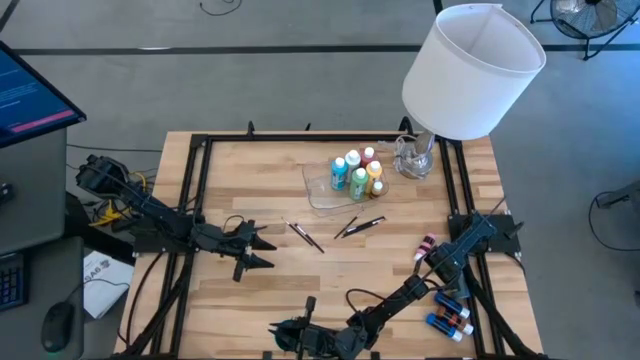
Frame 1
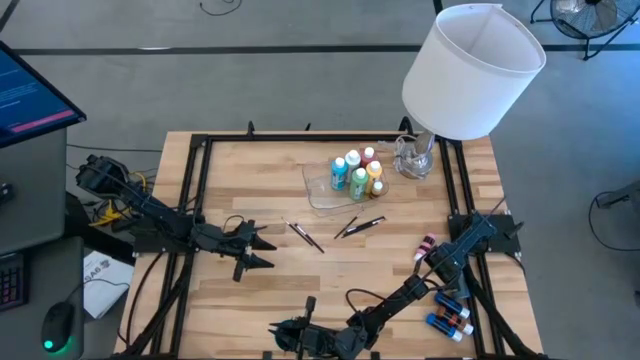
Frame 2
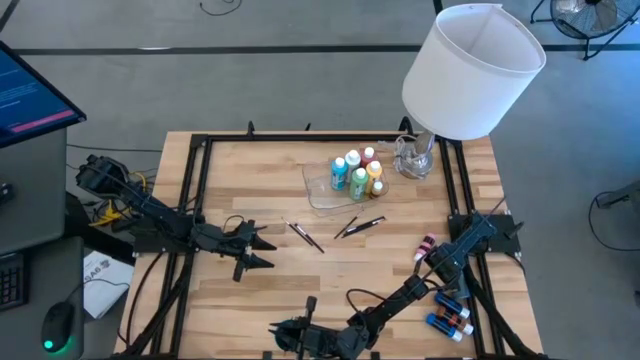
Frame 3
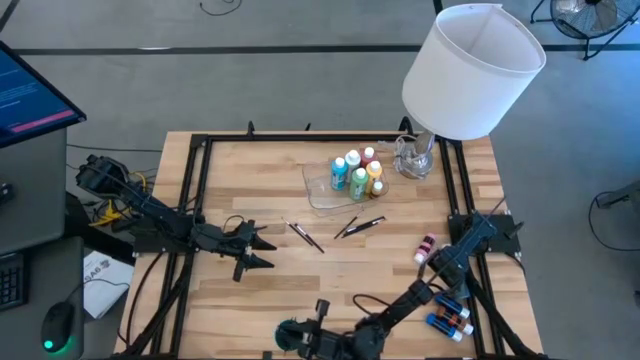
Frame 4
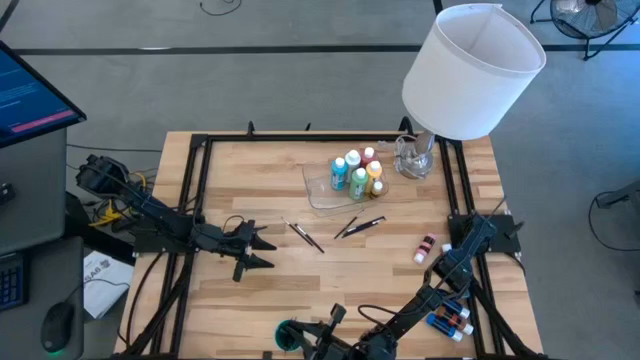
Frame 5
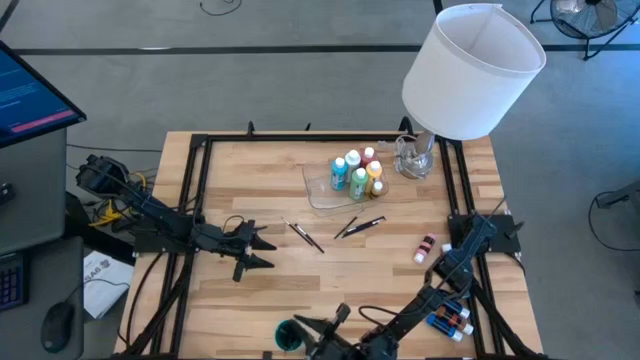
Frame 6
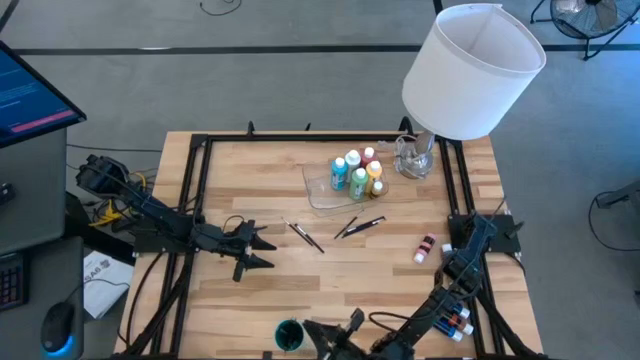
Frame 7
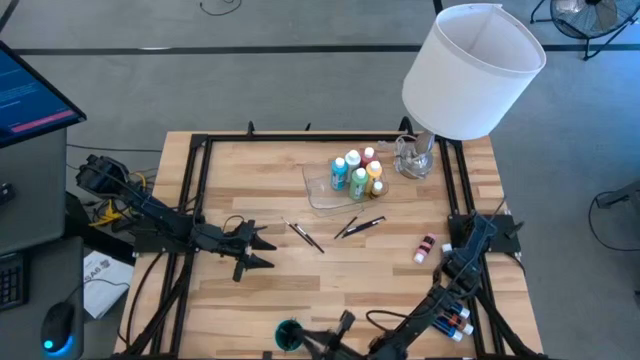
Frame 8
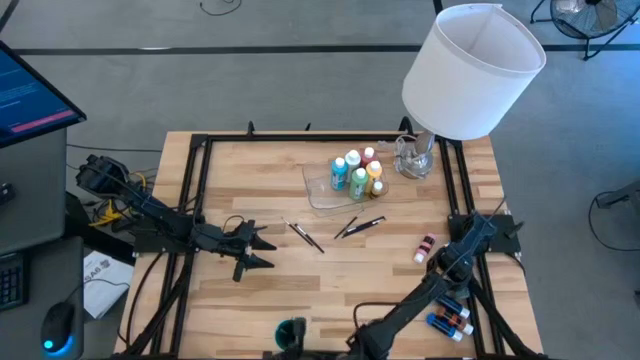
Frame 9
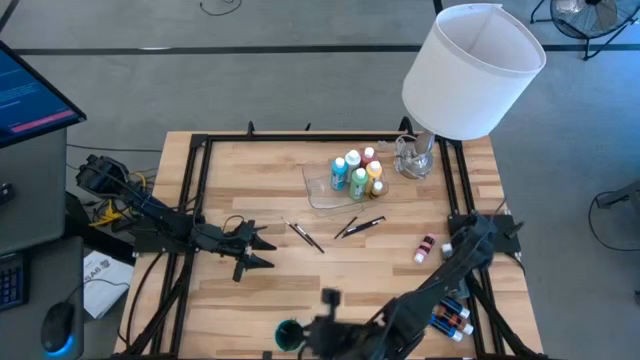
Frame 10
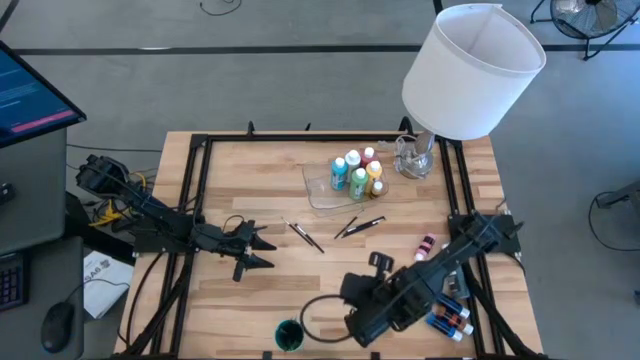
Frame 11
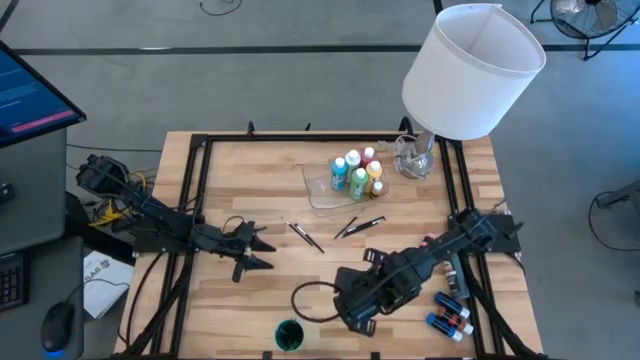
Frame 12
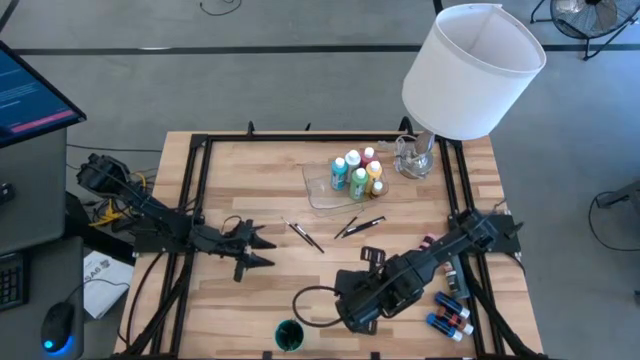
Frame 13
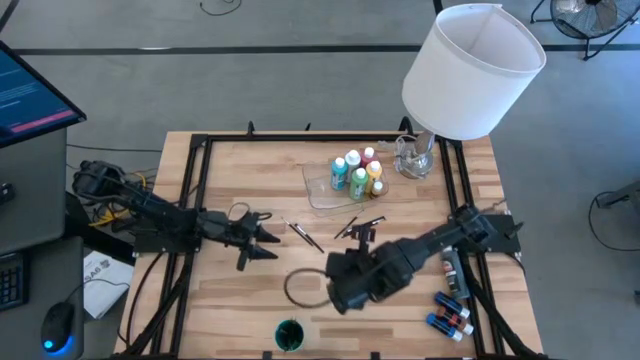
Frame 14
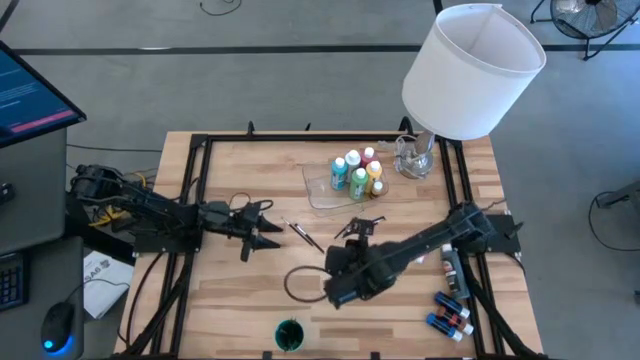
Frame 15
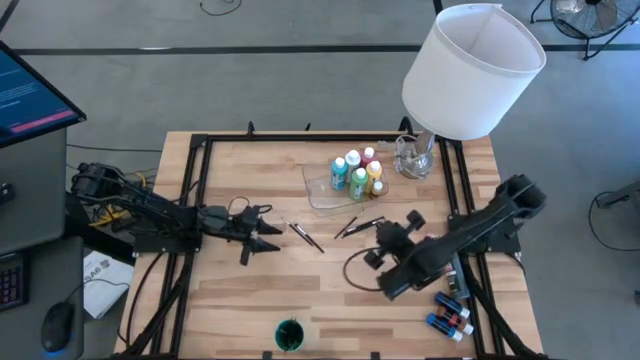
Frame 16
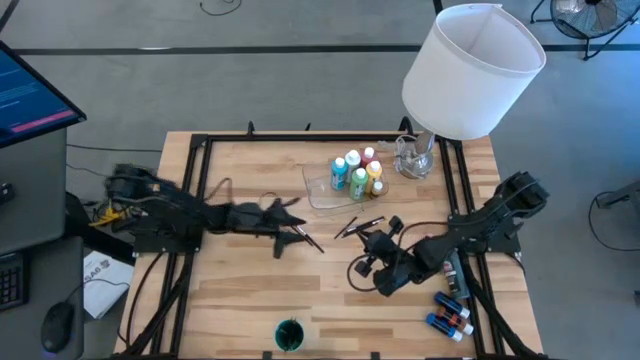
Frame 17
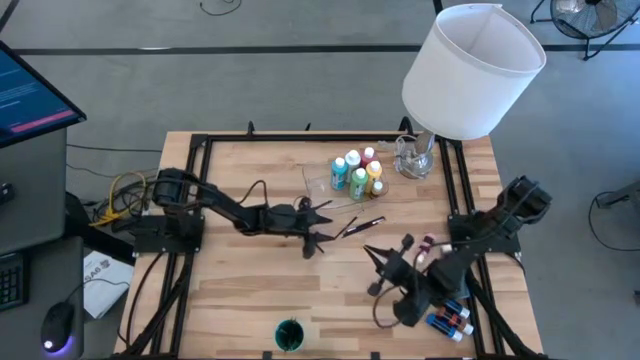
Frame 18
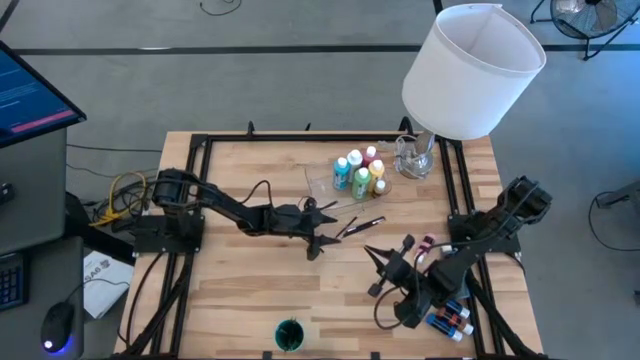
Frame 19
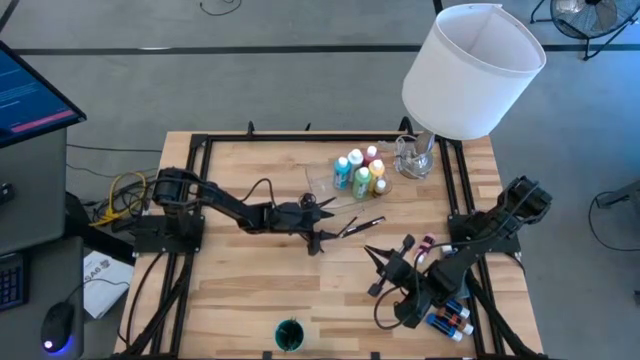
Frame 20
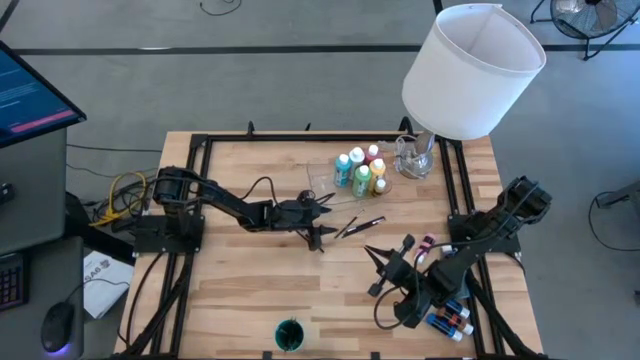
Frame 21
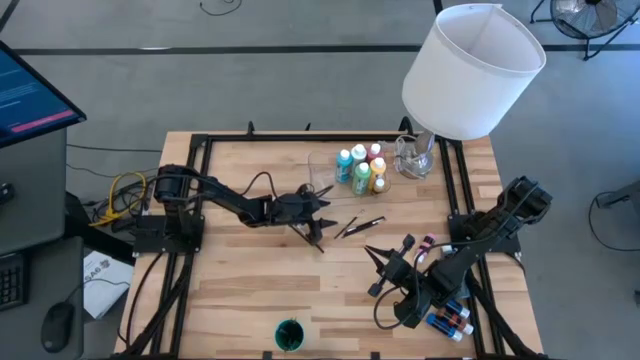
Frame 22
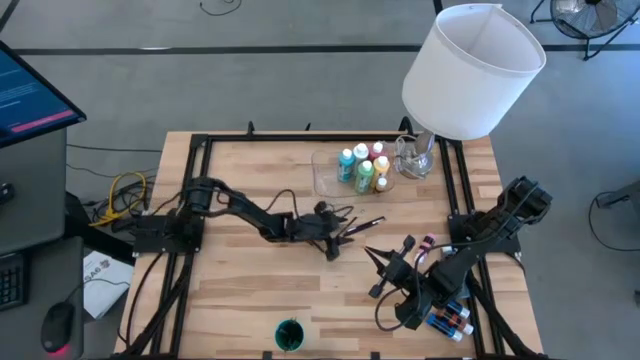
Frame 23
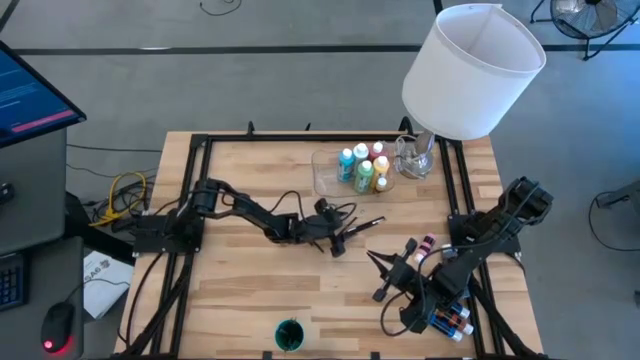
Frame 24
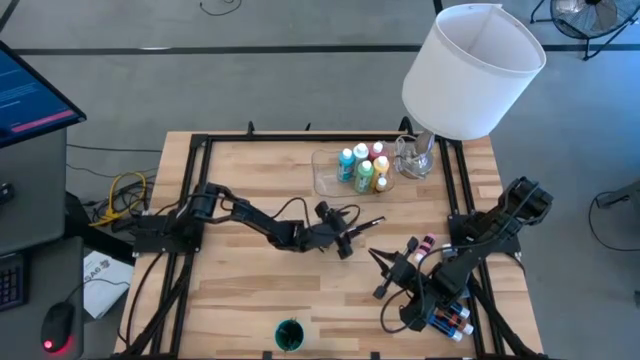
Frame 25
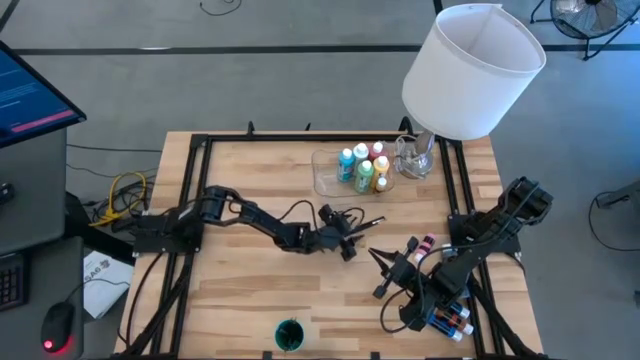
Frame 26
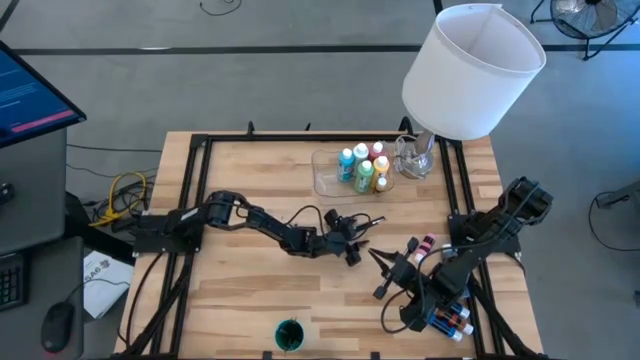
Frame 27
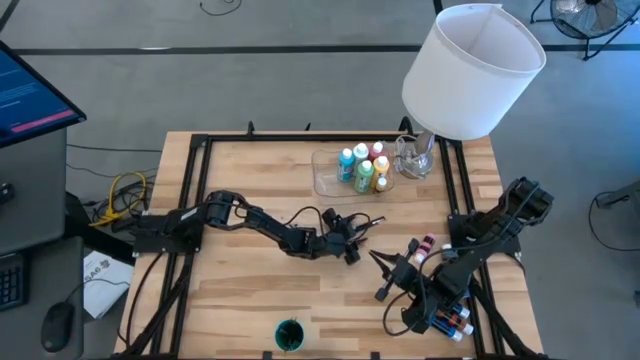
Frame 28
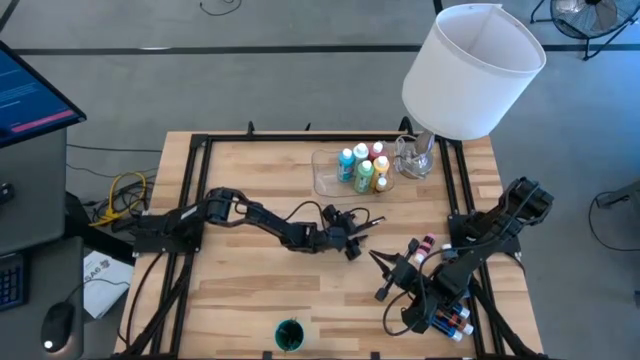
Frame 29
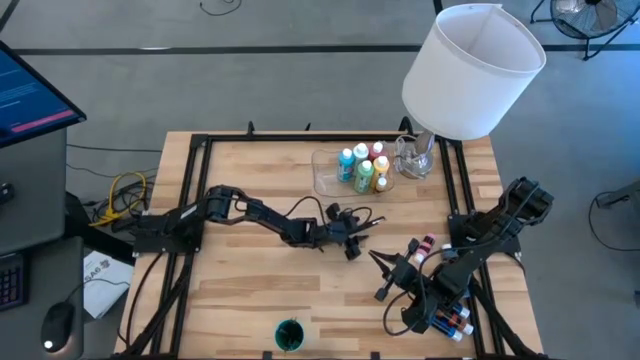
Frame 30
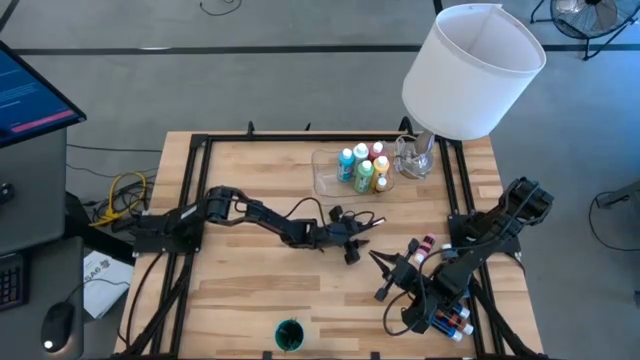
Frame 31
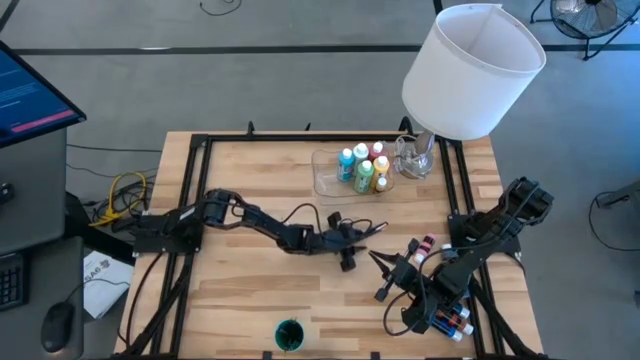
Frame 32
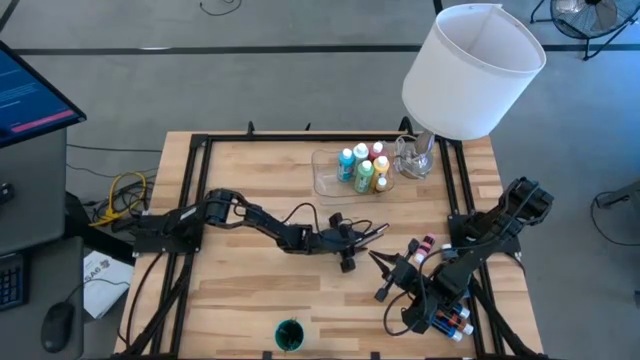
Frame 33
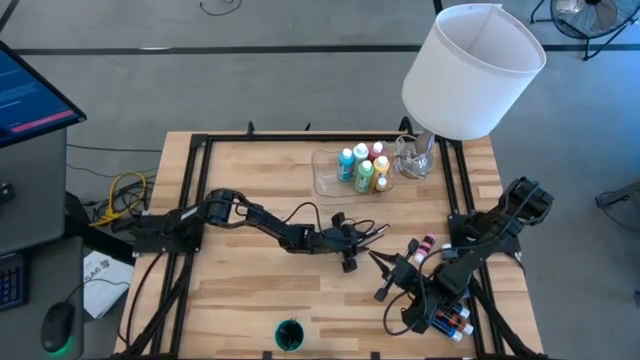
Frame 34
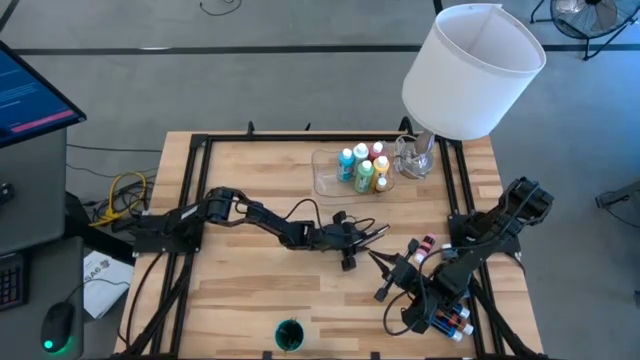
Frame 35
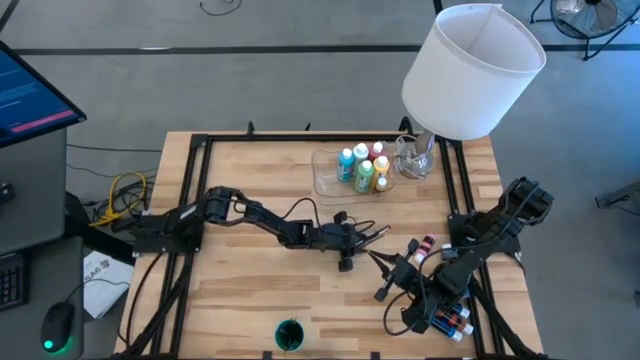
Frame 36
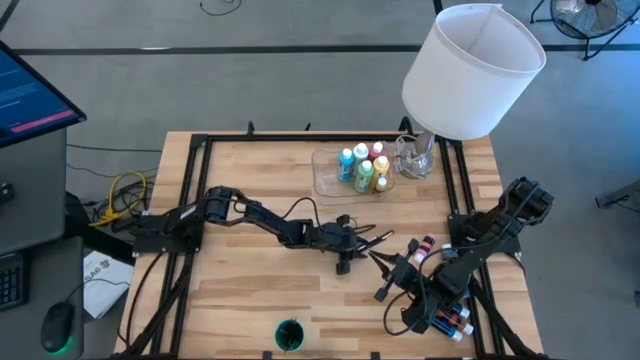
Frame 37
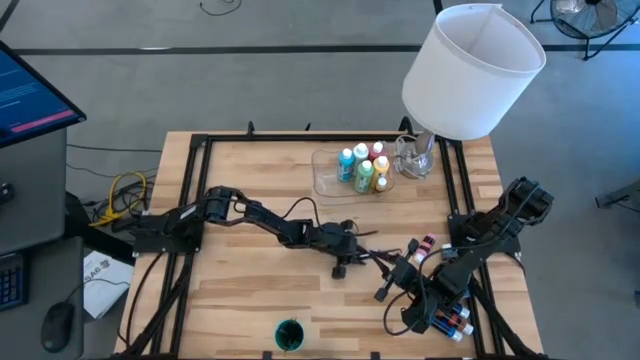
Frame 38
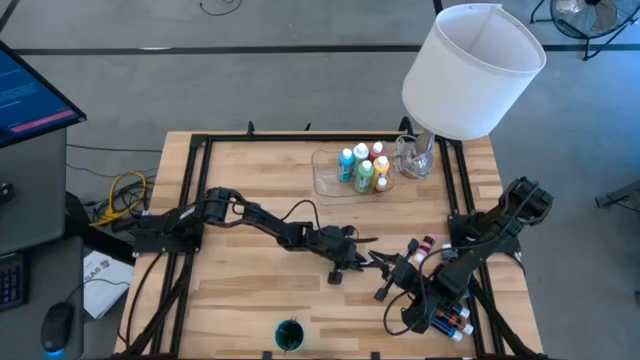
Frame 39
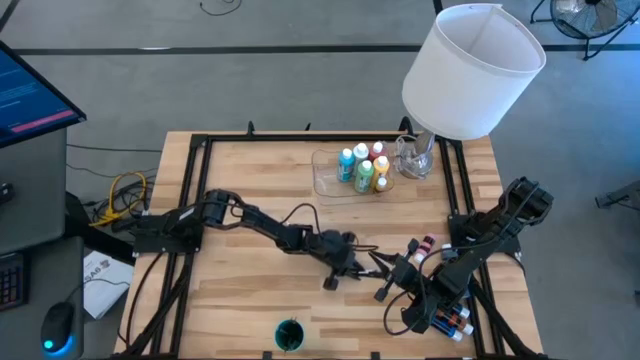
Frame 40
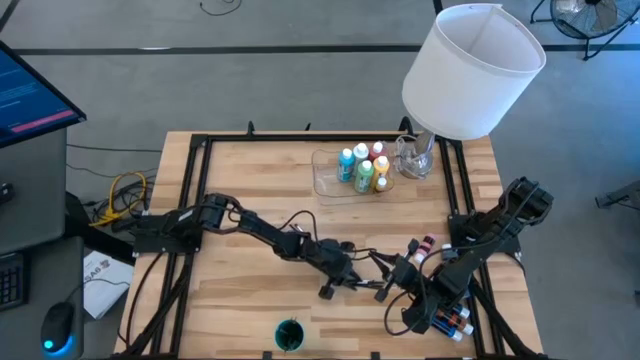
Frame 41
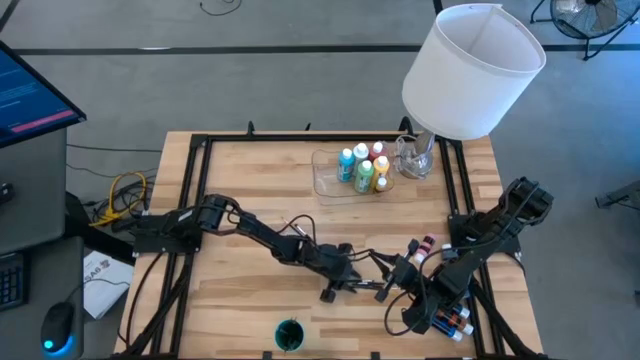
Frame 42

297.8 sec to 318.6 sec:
Task: Pick & Place Paint Supplies
Adjust the silver paintbrushes on the table
